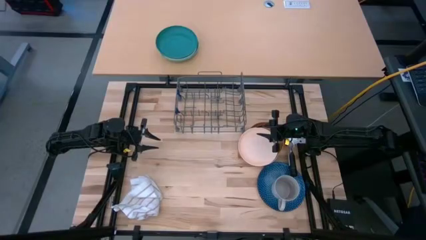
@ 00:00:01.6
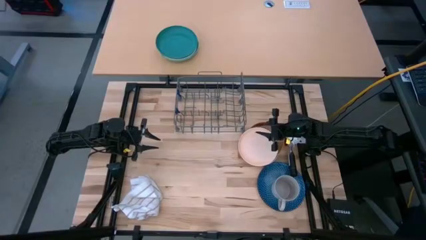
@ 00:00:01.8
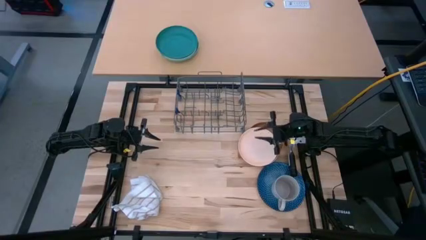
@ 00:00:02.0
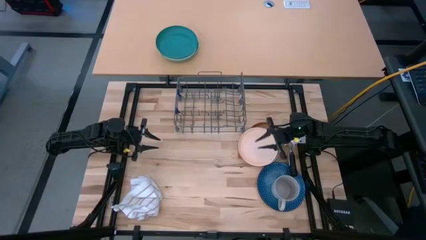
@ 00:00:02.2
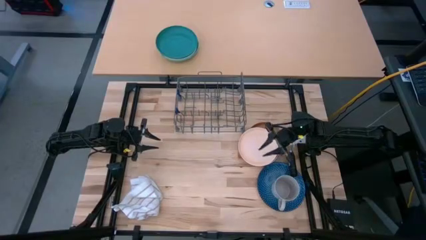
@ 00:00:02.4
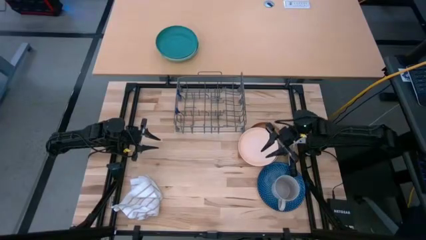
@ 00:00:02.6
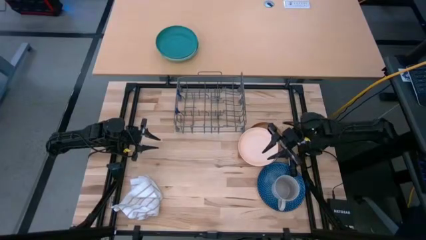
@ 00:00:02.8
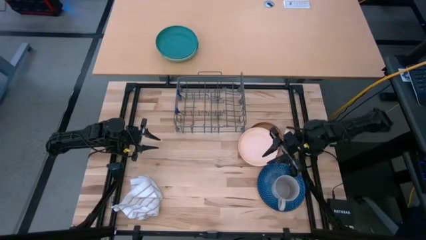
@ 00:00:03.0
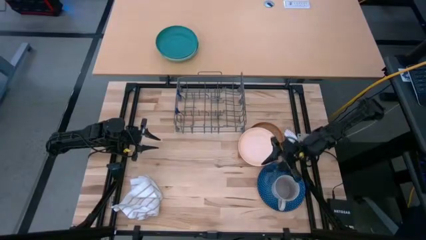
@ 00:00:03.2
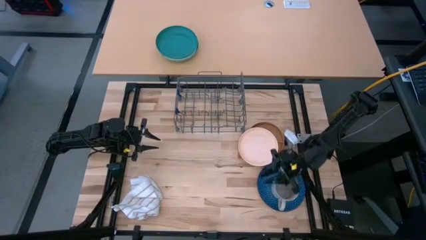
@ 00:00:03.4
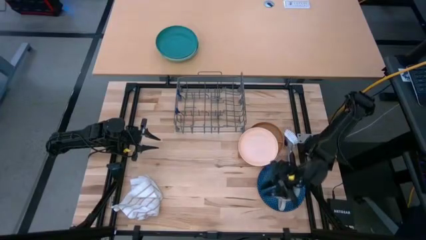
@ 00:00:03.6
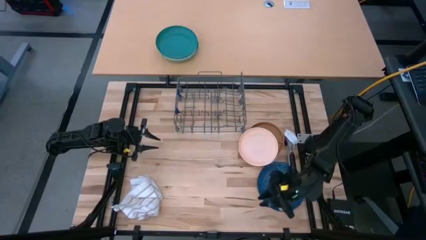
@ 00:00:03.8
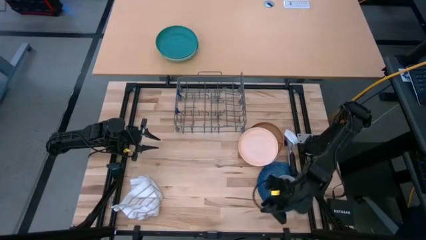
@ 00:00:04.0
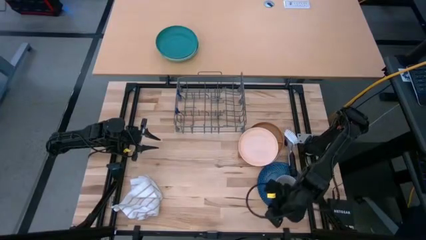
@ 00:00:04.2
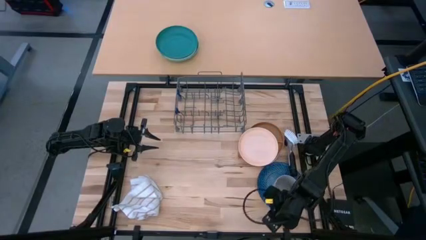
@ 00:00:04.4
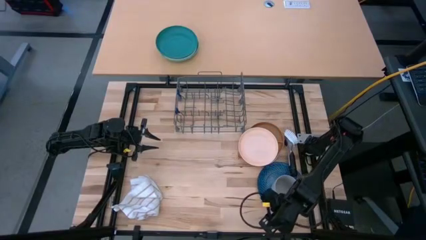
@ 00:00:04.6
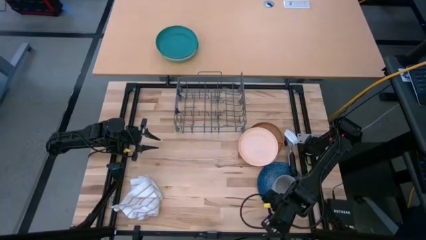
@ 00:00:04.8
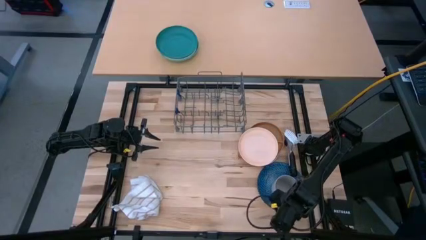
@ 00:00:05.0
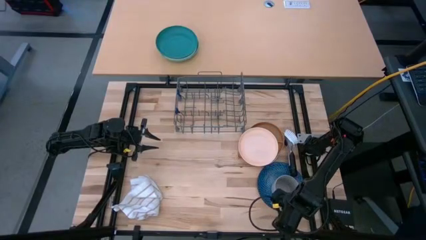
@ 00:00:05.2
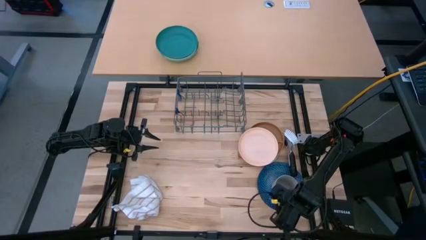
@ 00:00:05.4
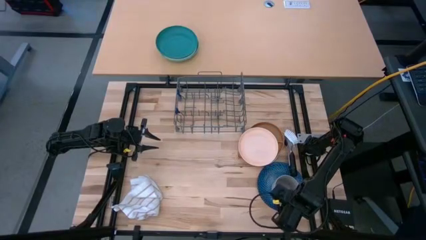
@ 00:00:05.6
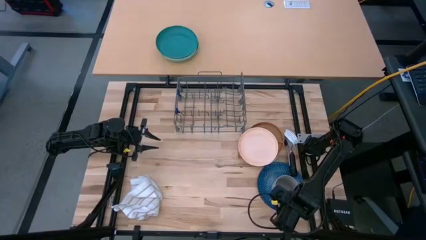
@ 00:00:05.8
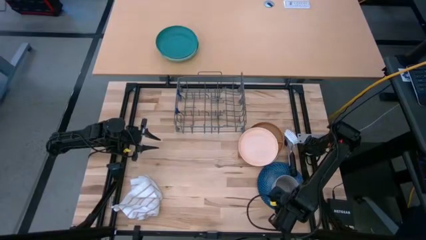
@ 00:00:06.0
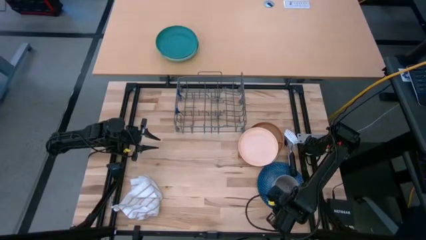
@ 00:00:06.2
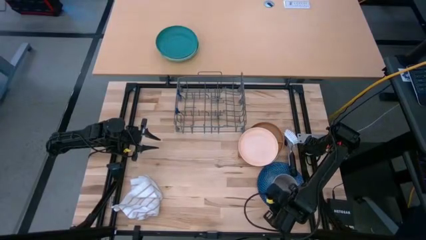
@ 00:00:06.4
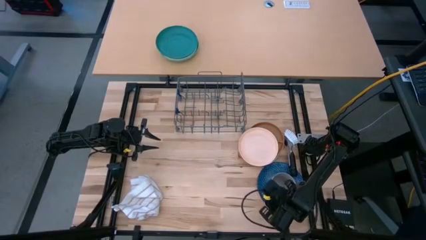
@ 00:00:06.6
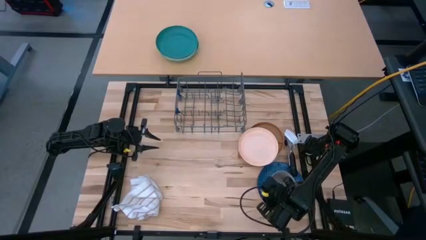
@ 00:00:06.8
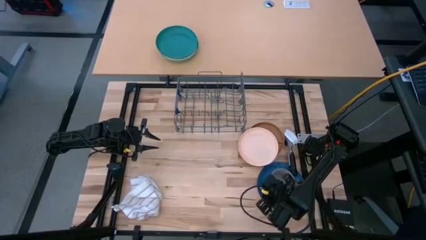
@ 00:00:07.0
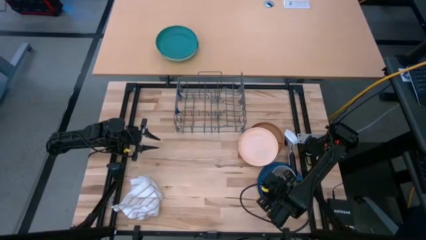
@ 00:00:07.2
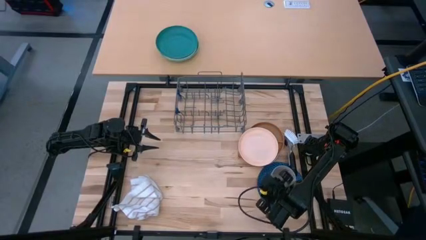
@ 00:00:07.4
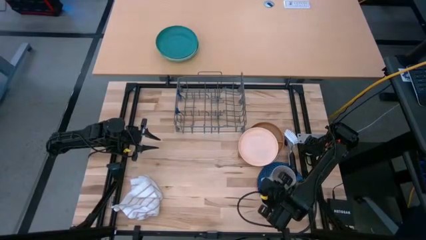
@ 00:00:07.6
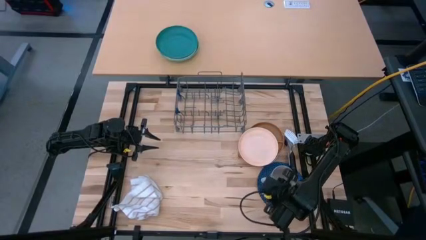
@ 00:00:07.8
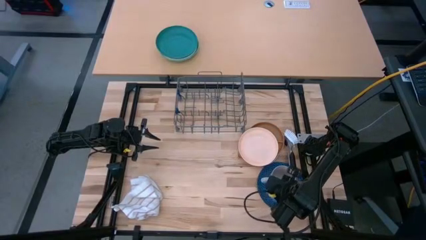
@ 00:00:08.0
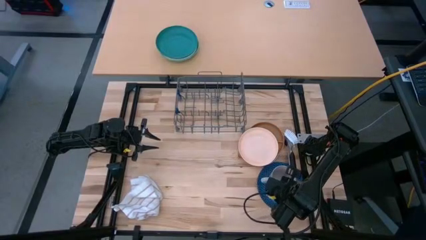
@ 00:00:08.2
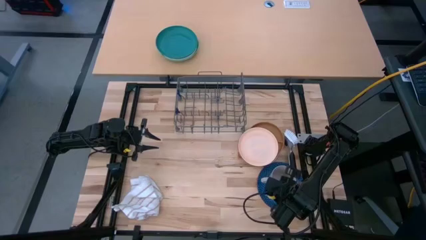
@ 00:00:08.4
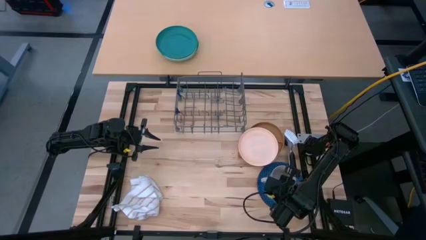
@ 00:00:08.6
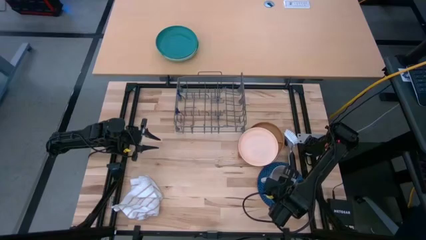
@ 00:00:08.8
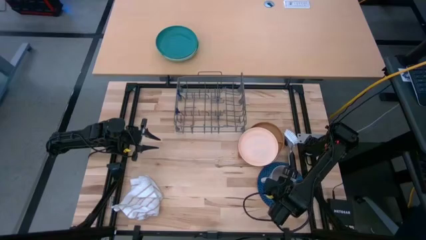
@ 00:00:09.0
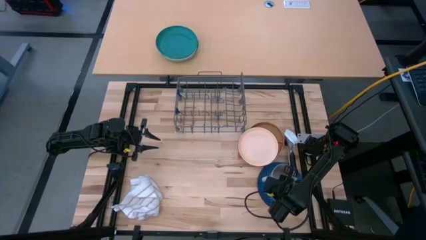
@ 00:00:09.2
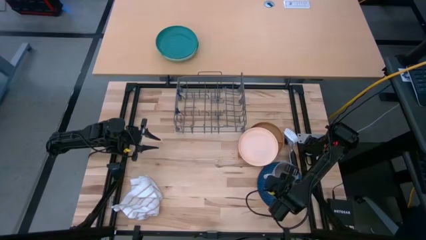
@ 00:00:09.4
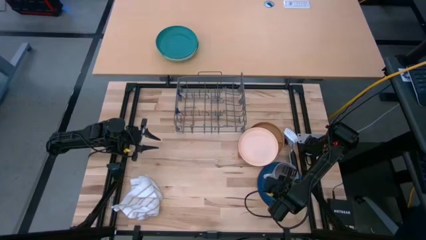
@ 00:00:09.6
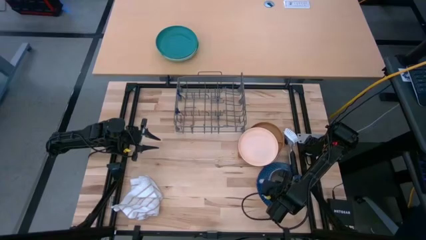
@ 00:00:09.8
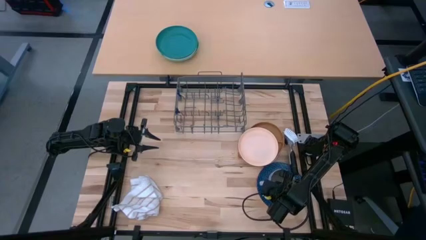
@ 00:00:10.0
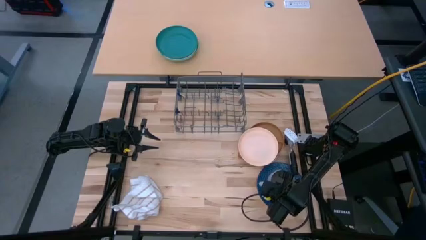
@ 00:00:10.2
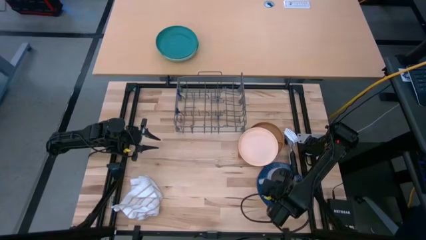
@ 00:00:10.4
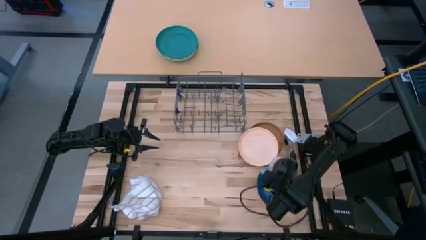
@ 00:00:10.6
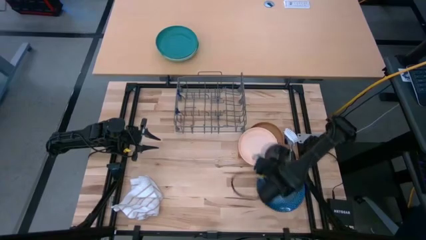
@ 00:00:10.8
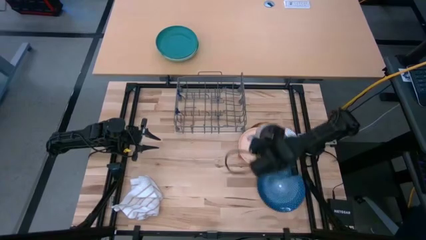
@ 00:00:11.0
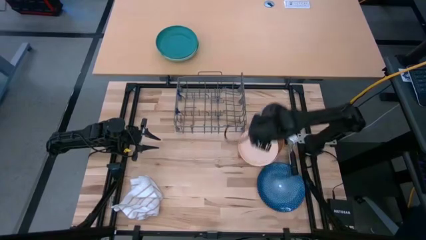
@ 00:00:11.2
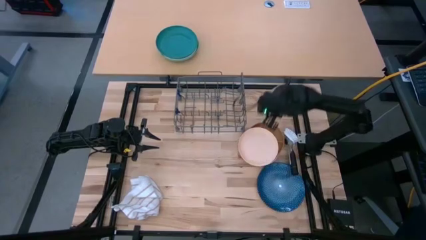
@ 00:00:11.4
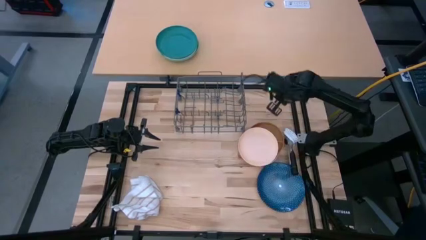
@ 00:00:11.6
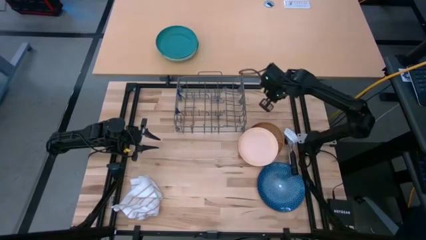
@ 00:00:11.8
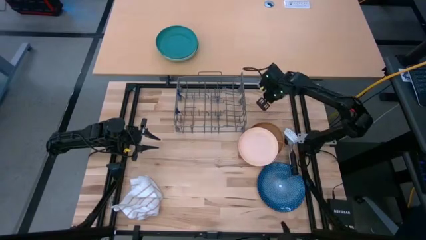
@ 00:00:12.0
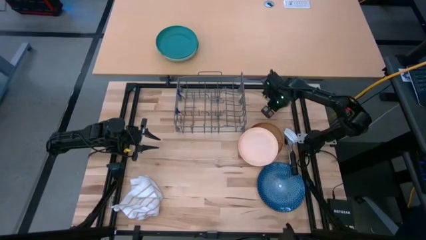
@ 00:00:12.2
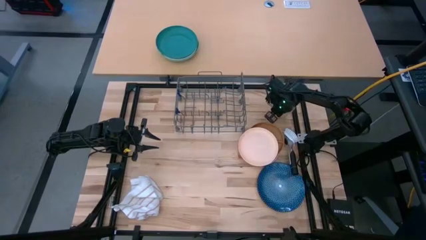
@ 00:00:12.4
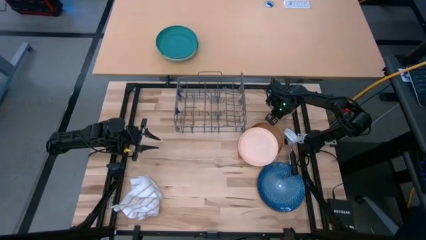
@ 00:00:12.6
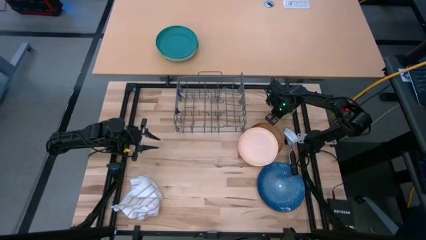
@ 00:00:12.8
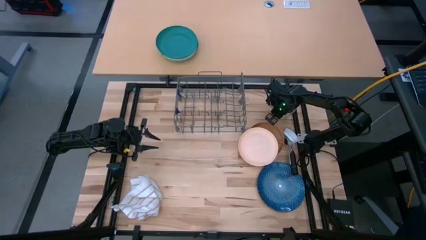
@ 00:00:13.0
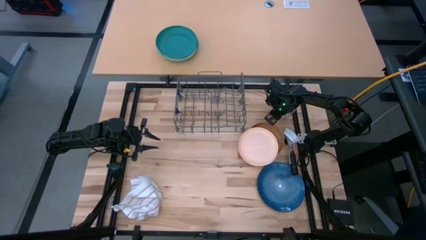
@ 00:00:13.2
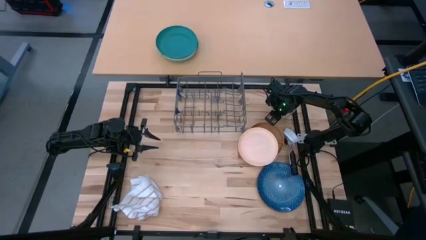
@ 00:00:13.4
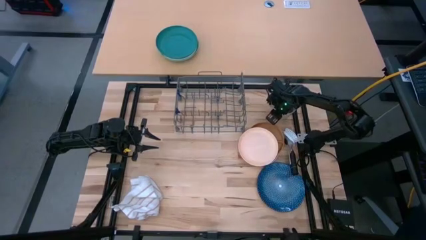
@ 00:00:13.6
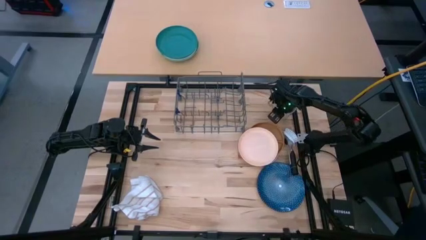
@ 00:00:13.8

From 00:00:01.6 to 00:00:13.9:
Task: Sort dishes
Move the gray mug to the top right of the table
